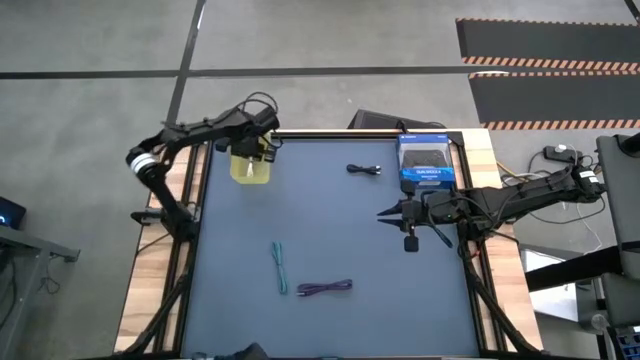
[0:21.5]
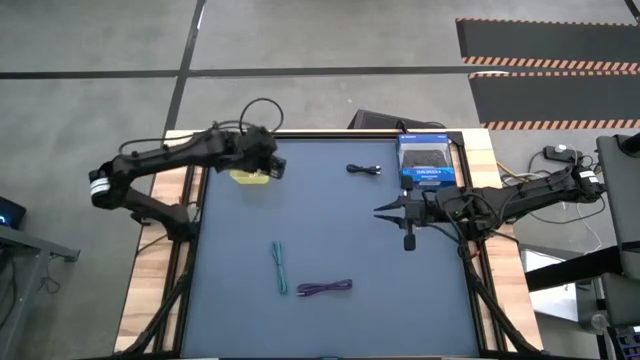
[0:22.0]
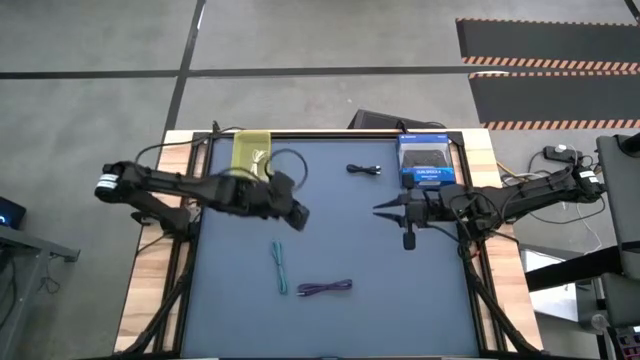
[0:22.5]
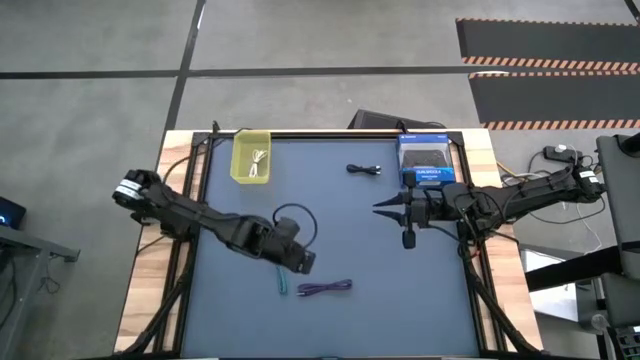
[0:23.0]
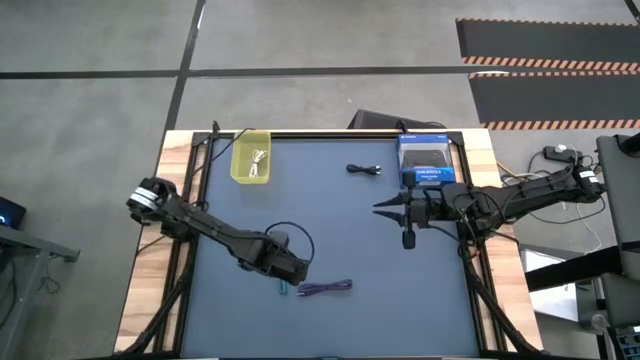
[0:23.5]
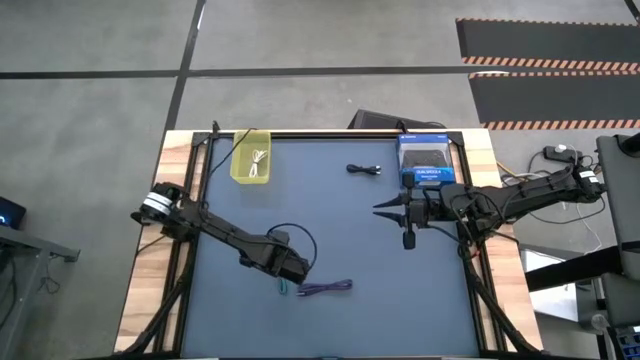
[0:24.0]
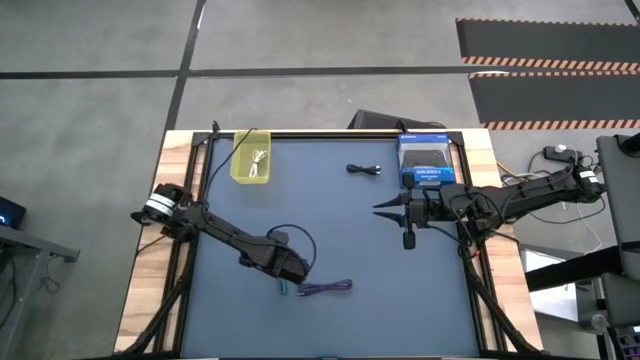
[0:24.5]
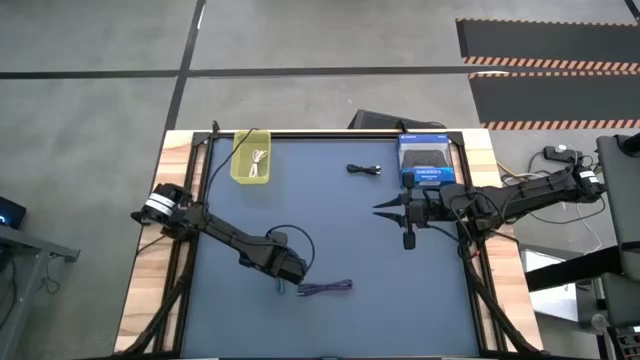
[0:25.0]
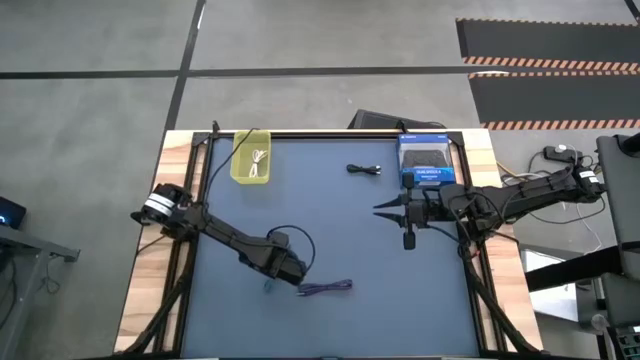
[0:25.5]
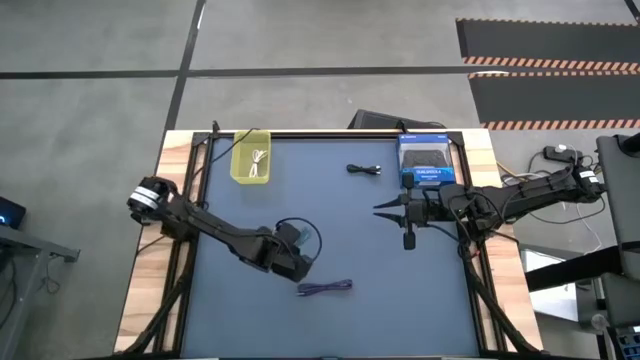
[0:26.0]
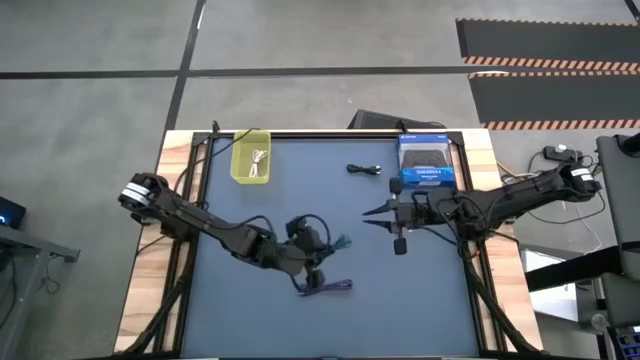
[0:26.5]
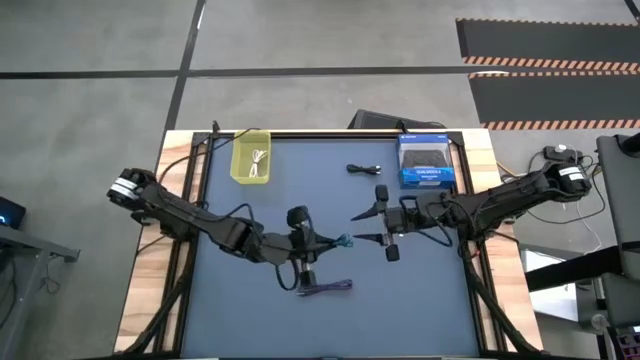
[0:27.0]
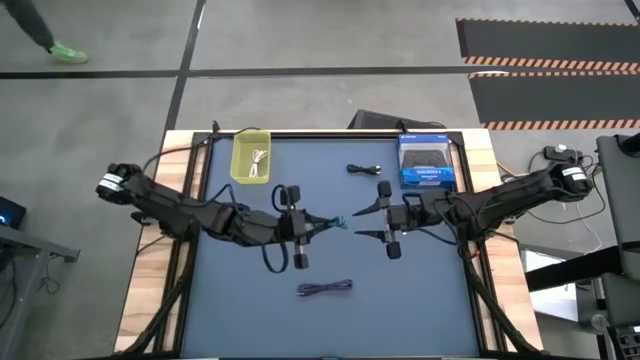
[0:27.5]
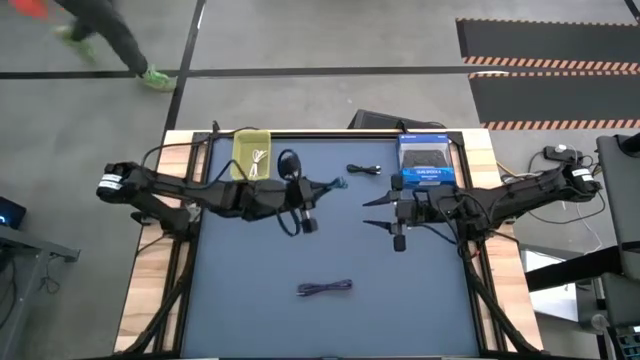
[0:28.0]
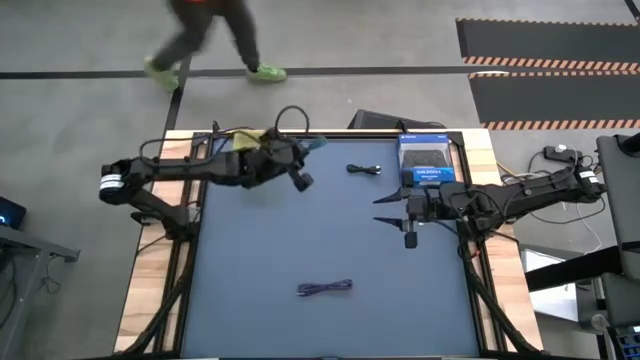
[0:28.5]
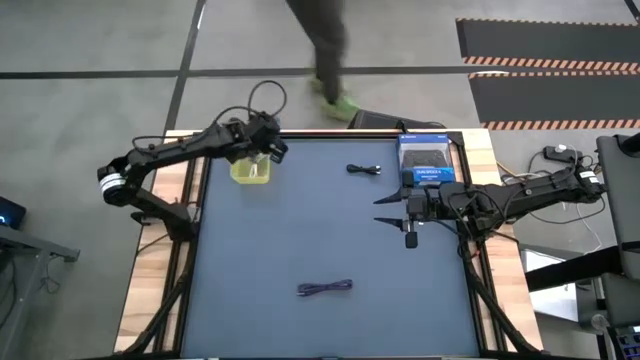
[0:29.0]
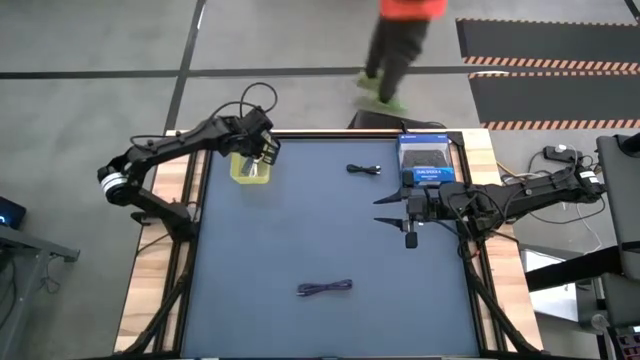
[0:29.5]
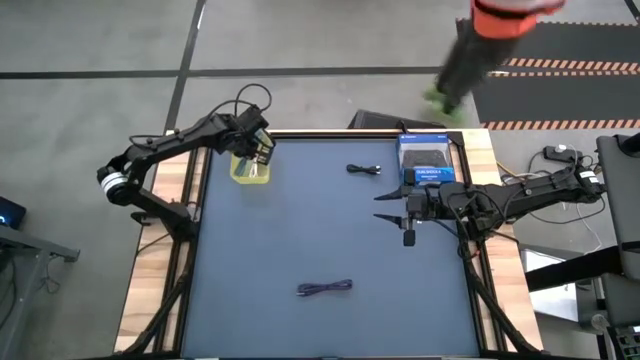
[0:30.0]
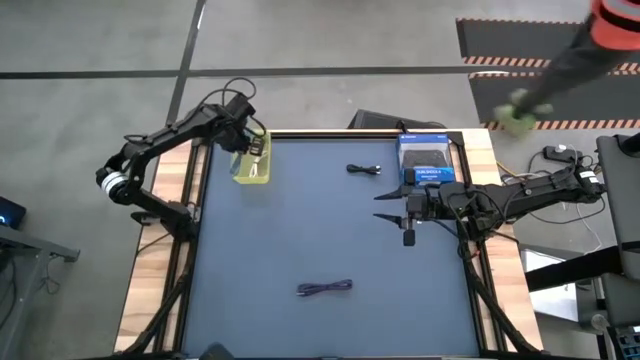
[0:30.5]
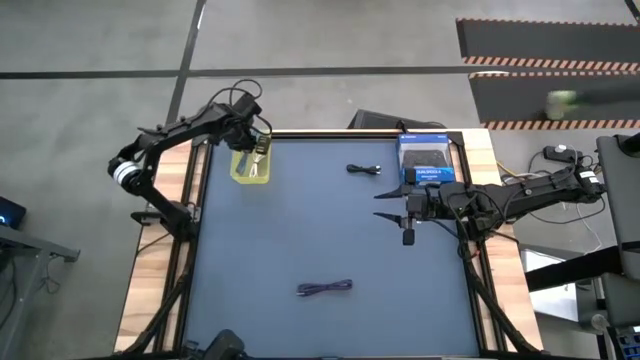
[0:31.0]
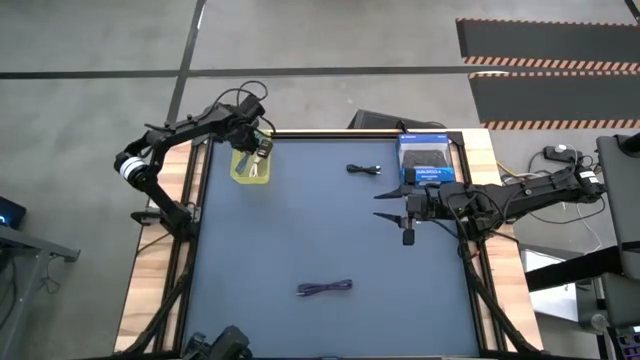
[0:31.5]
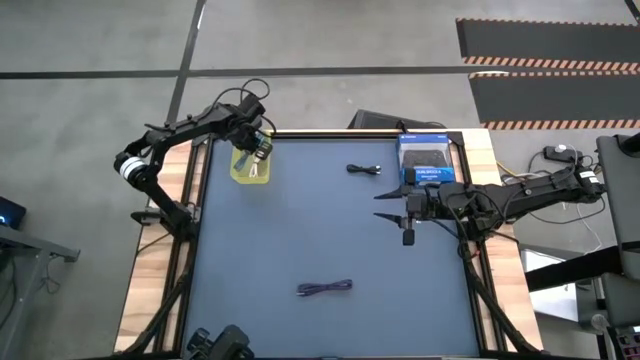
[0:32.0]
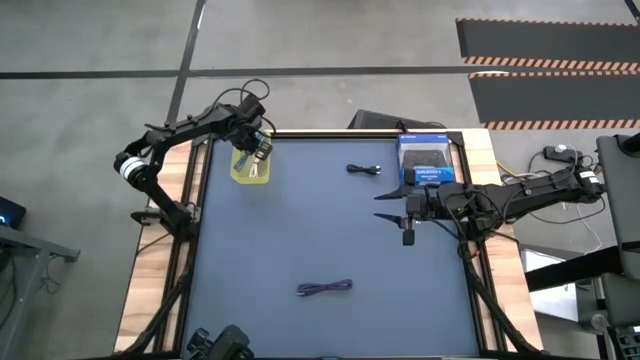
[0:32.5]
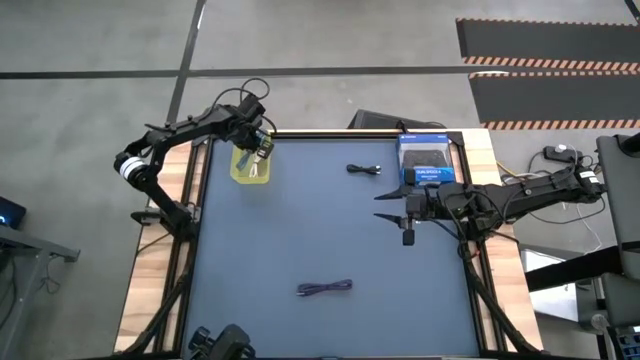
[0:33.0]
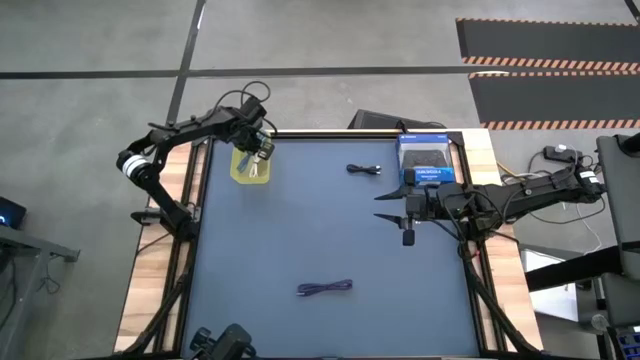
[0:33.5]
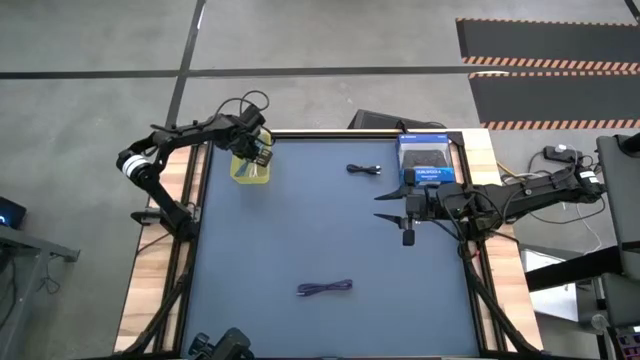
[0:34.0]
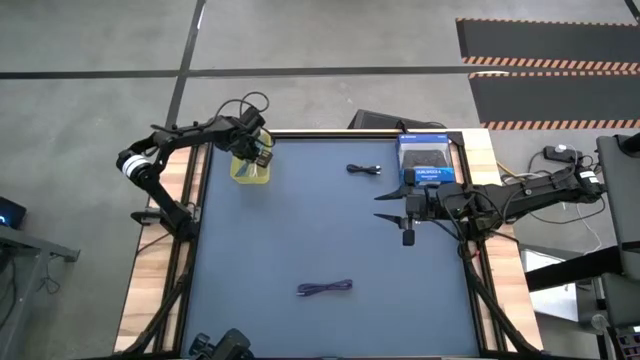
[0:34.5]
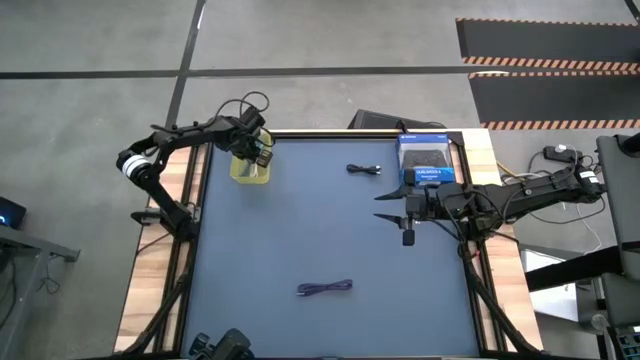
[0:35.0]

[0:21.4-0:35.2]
Task: Pick and place USB-C Cables
Put the blue black charger cable into the yellow bin

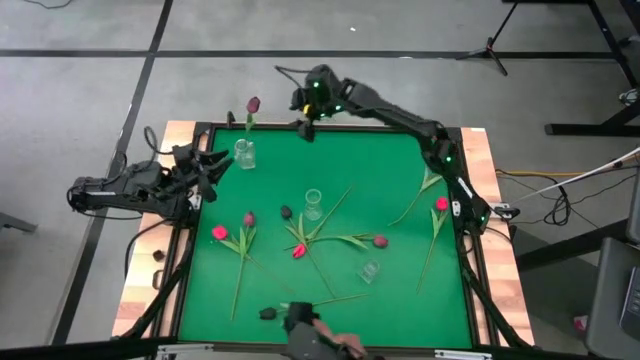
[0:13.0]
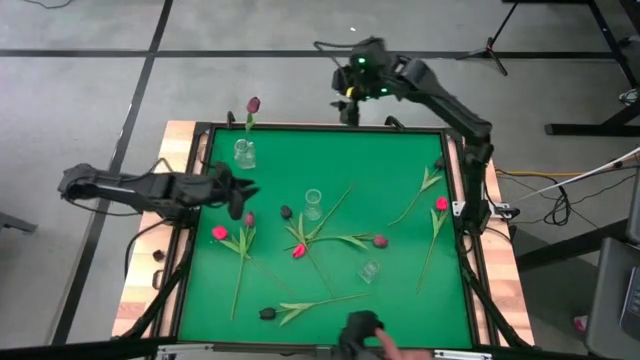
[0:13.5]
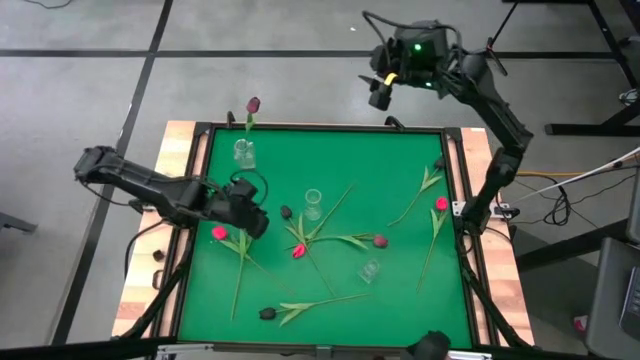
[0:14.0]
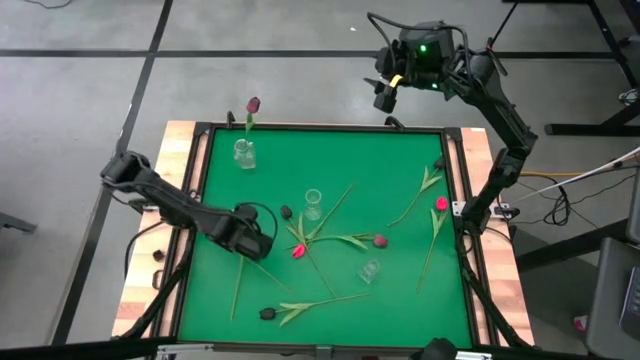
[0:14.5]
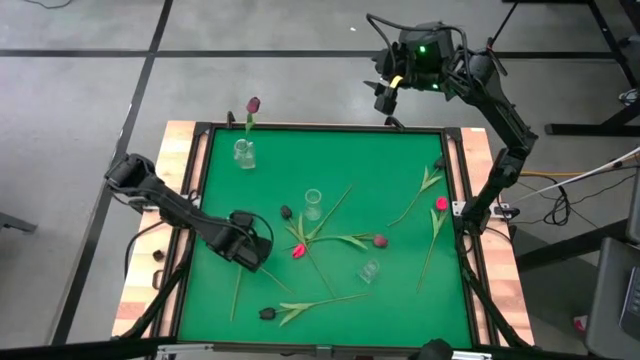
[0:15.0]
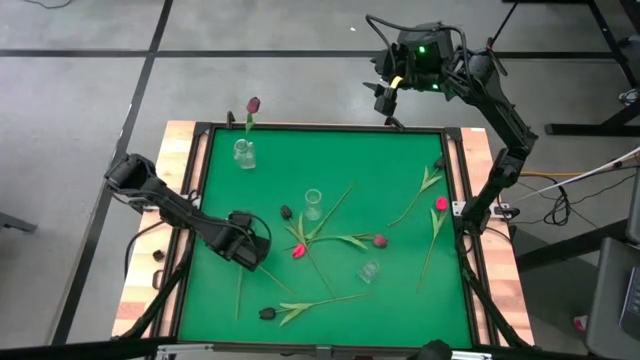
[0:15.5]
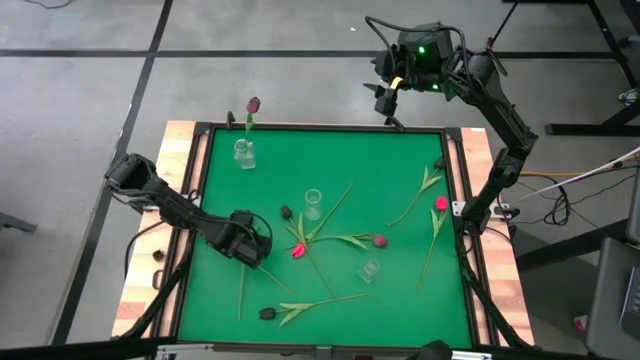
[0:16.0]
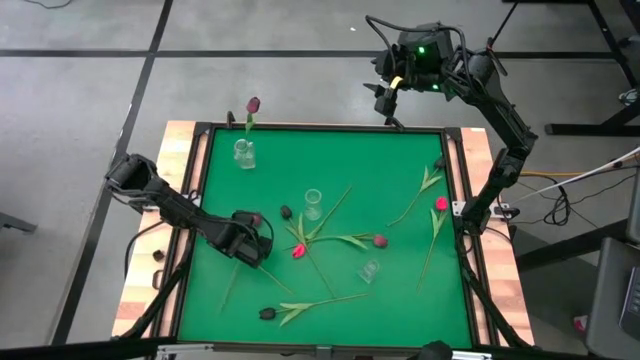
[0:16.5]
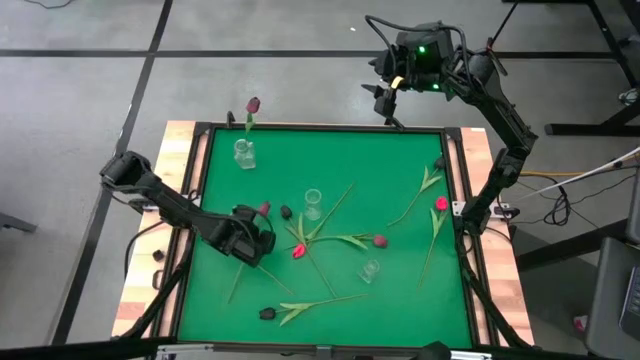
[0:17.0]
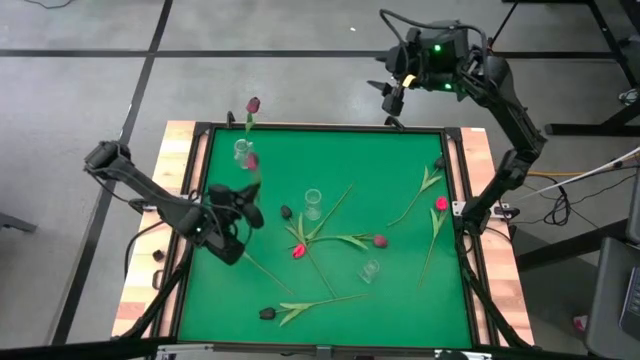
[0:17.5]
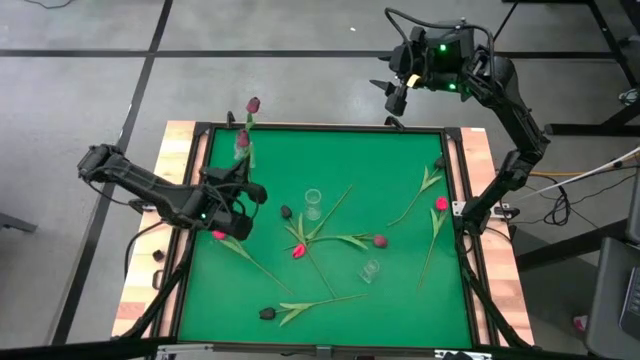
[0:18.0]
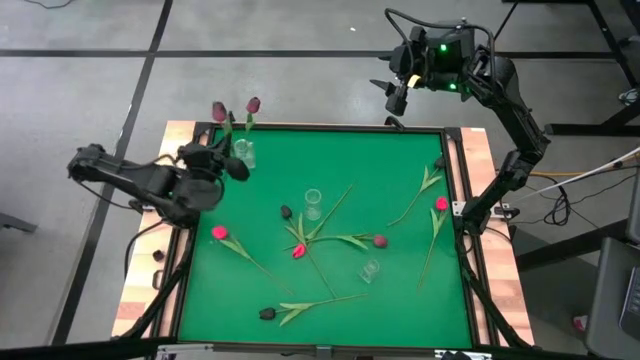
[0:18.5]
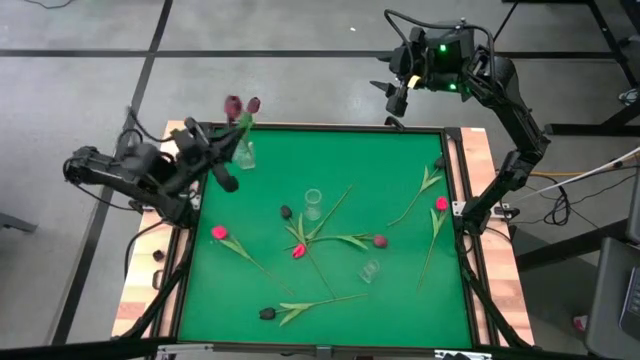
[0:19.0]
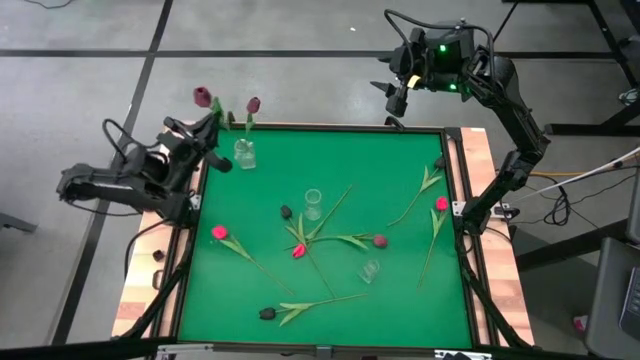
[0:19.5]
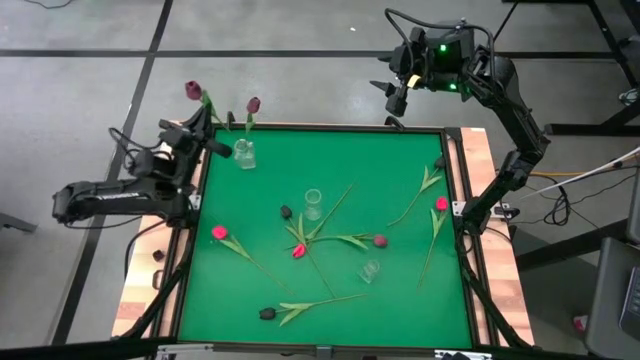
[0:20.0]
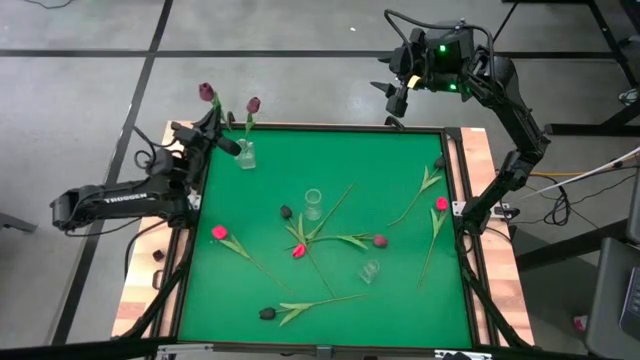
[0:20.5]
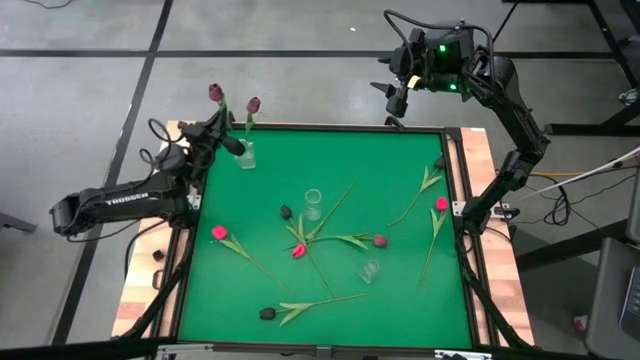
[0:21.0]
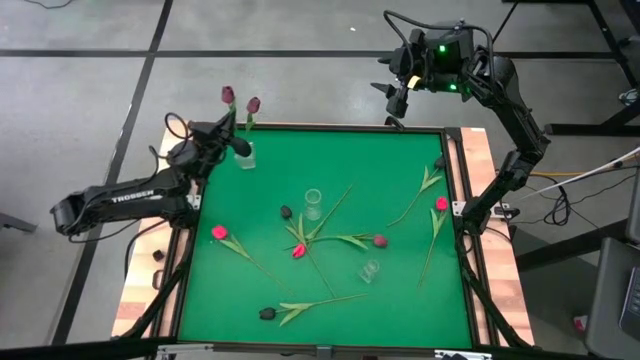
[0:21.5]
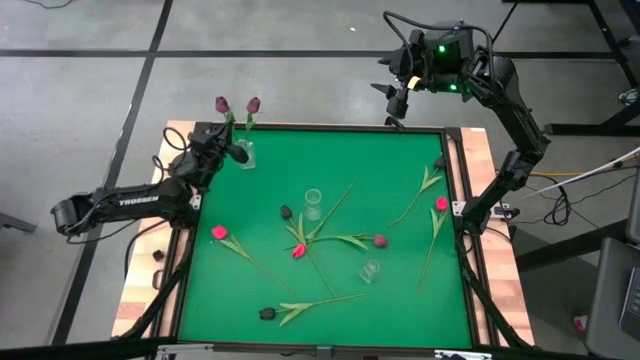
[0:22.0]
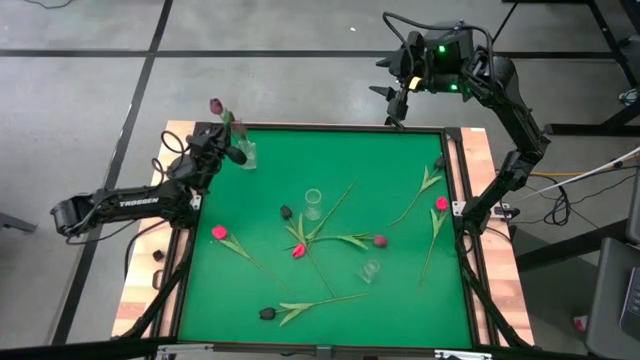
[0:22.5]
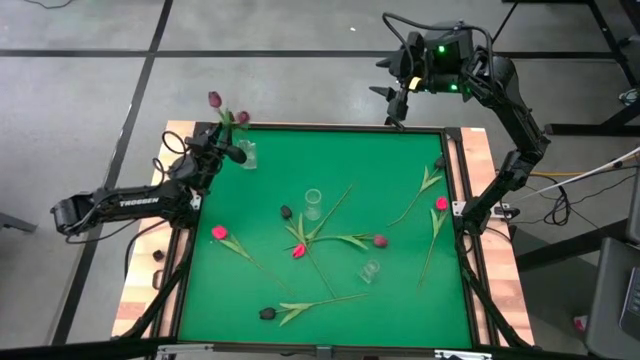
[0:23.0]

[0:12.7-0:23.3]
Task: Sort flowers into vase by color
Put the left dark red tulip into the top transparent vase
